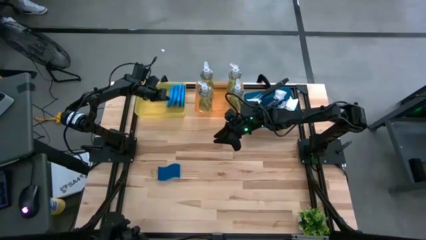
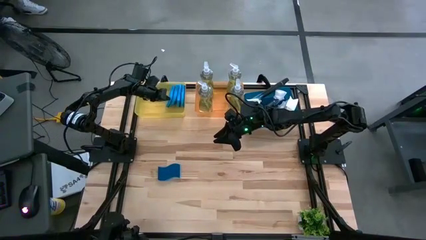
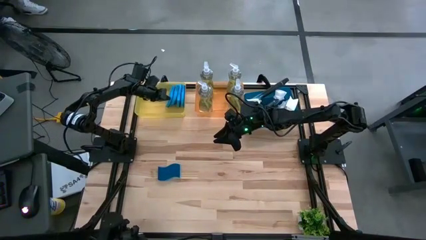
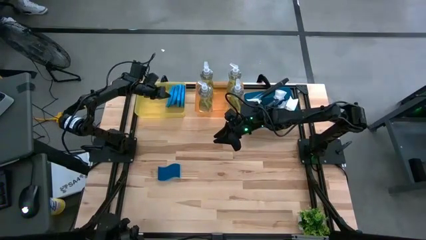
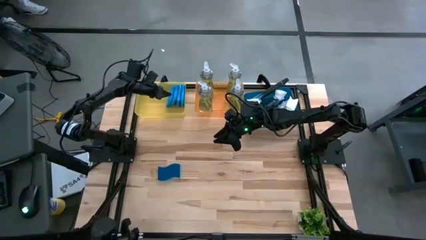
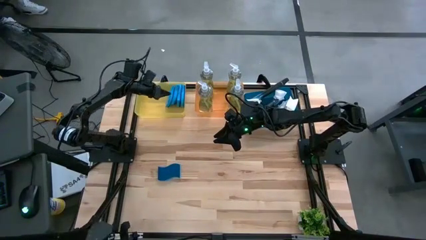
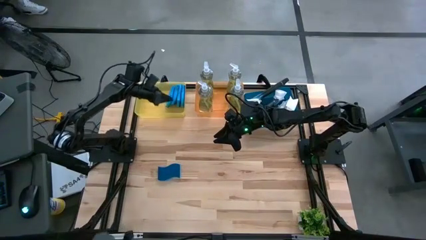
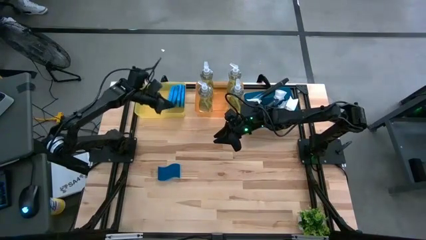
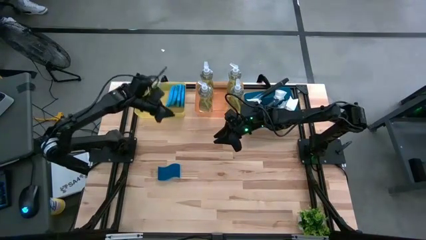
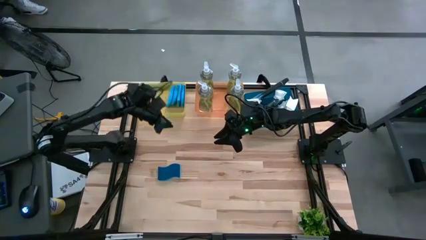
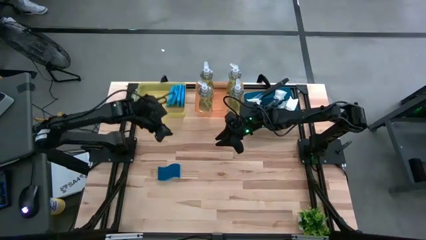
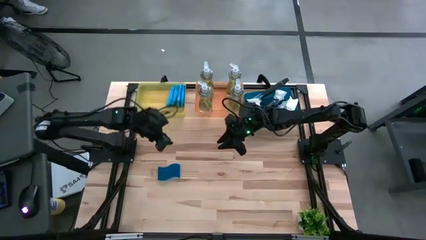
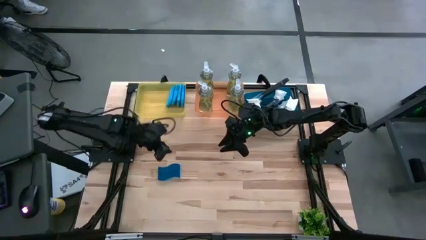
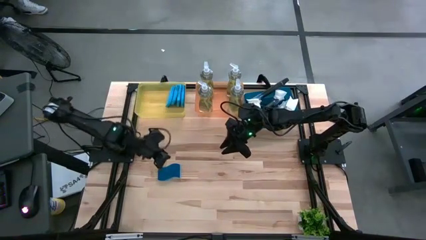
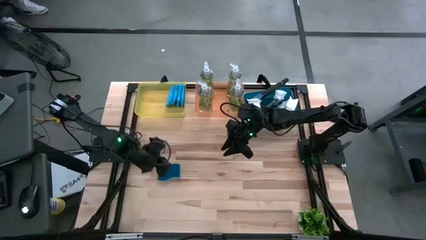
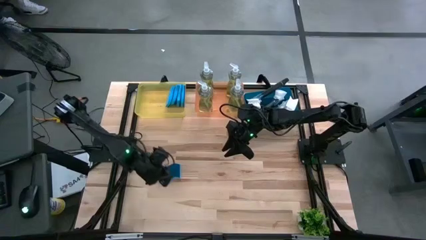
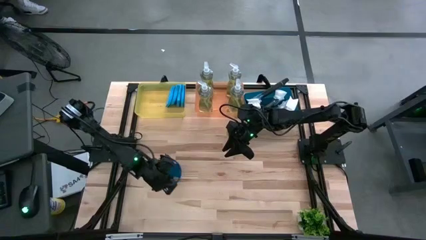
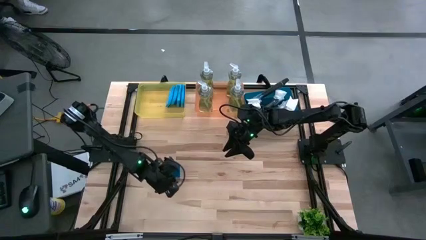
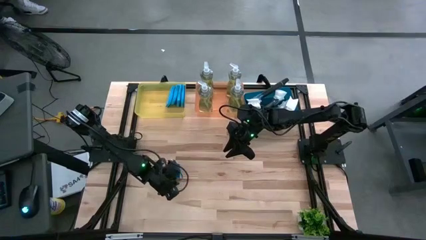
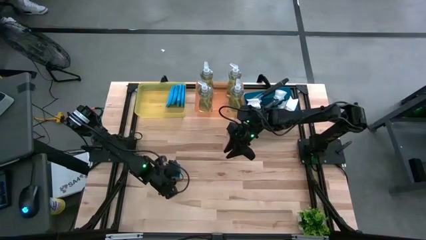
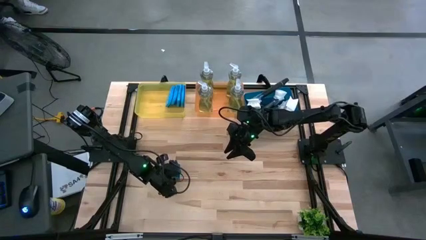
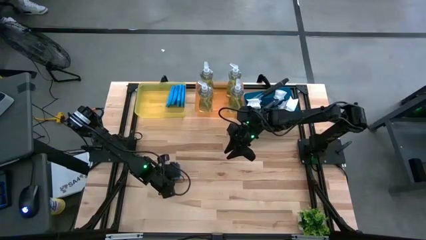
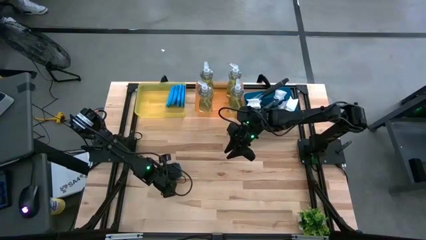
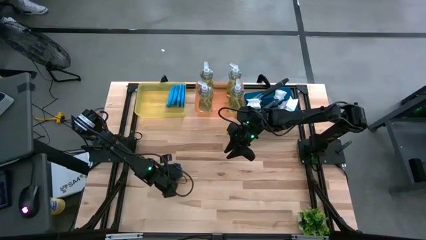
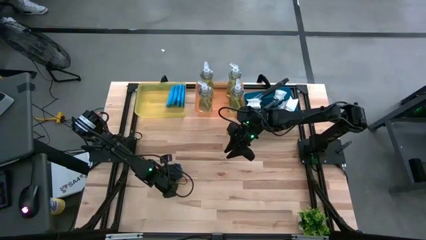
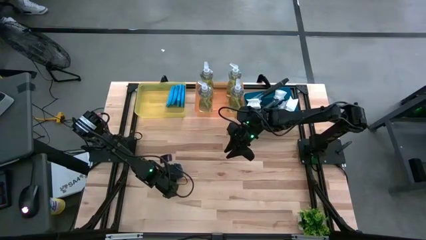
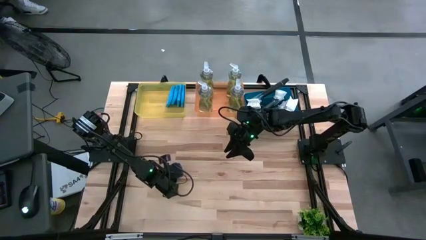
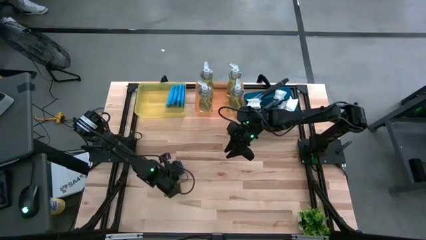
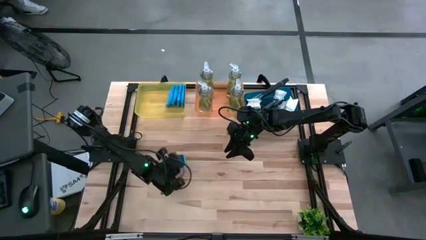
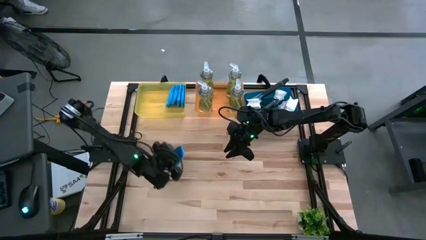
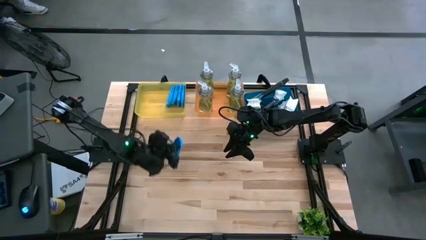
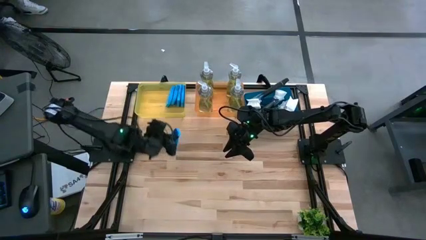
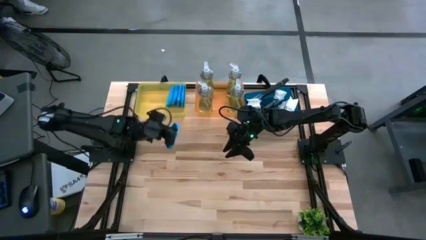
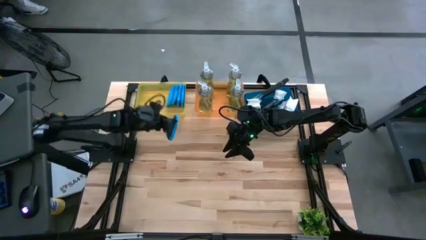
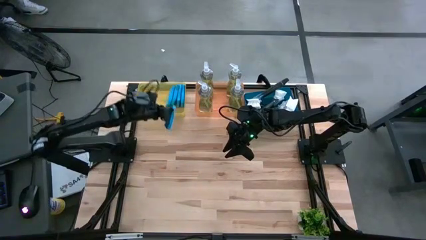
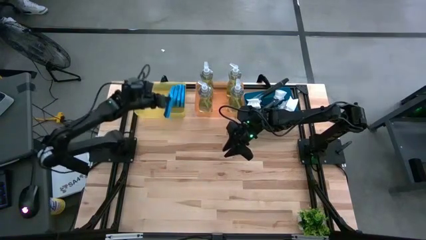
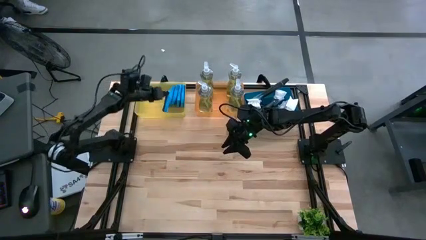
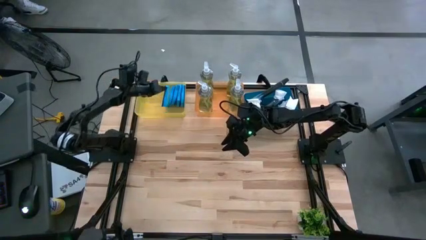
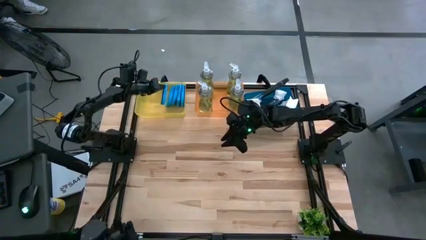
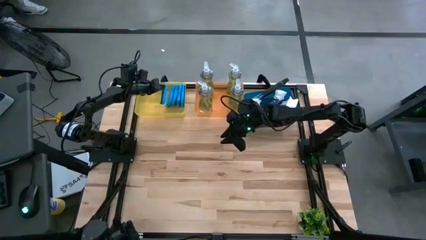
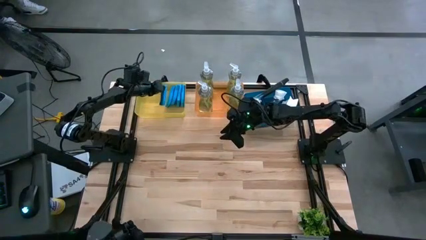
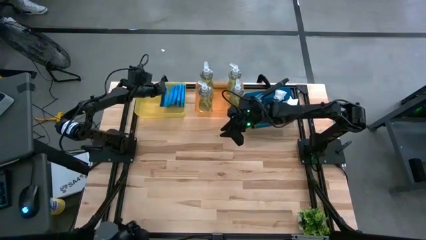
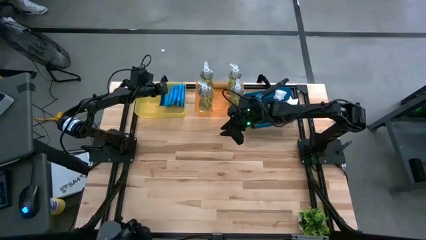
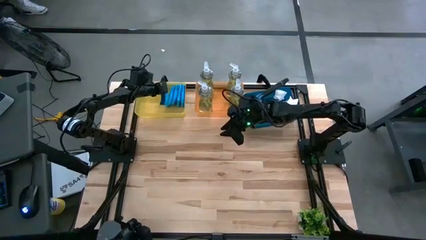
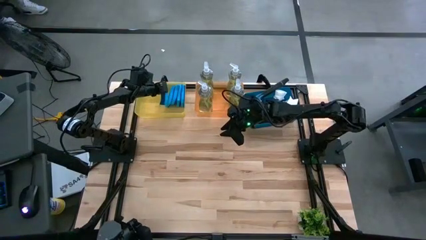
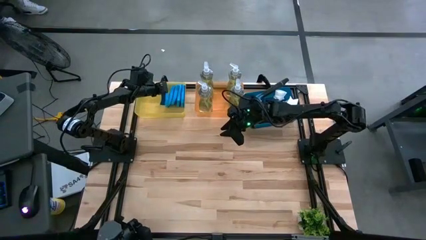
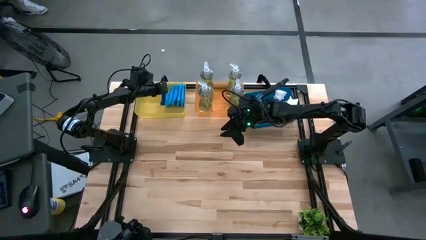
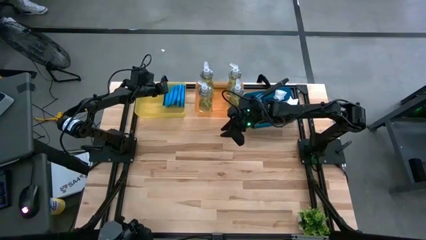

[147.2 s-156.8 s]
Task: Pick & Place Kitchen Sink Supplies
Put the blue sponge into the yellow bin

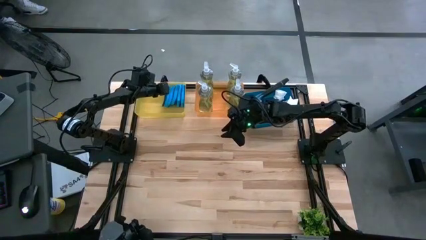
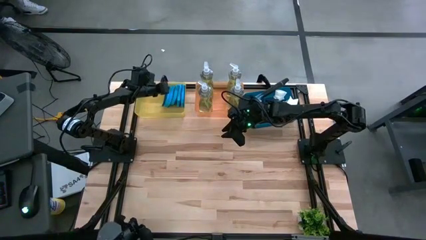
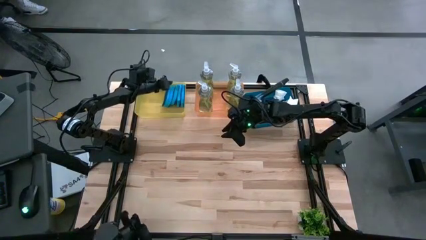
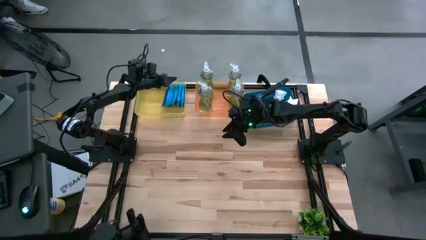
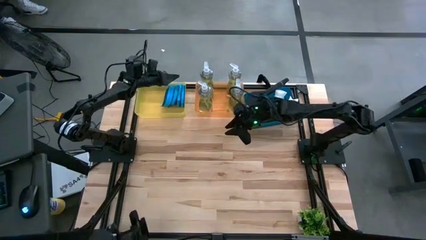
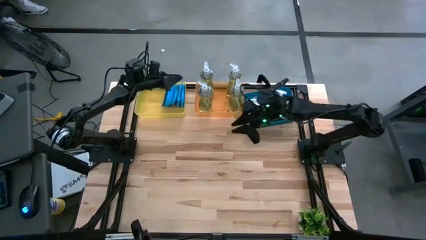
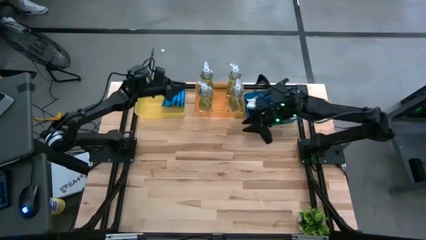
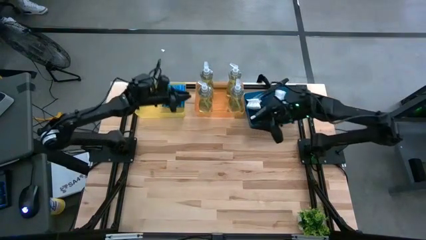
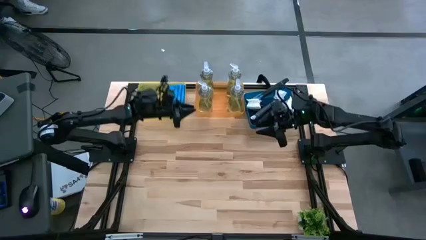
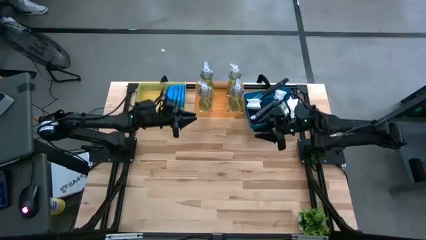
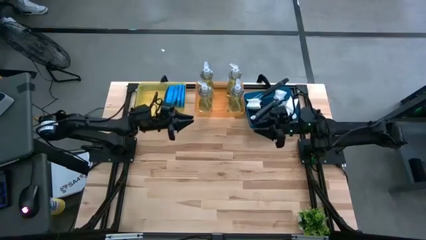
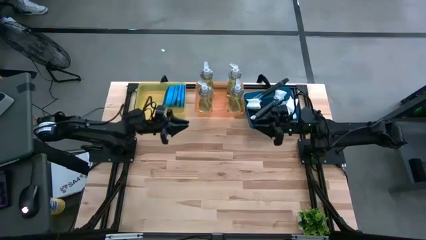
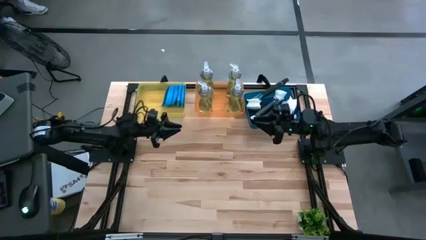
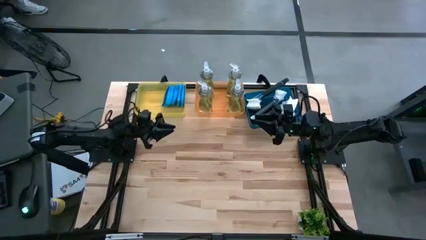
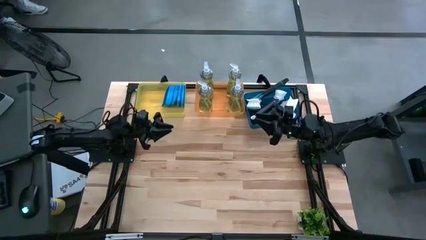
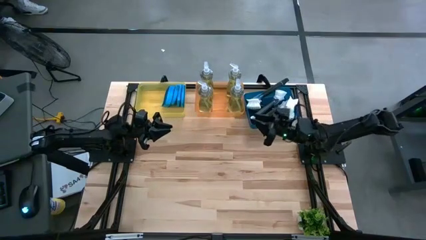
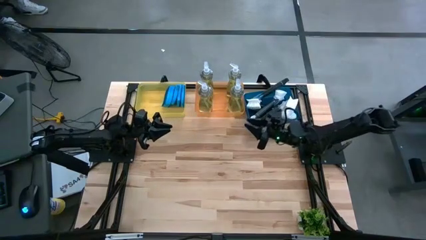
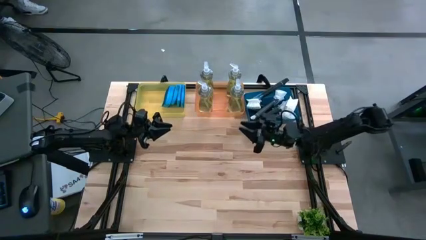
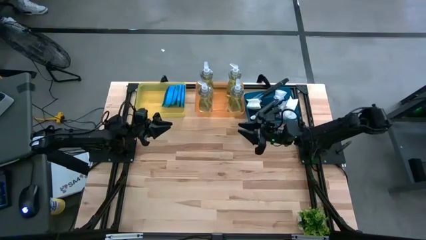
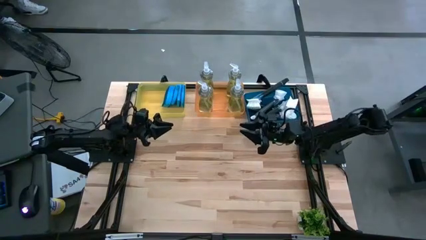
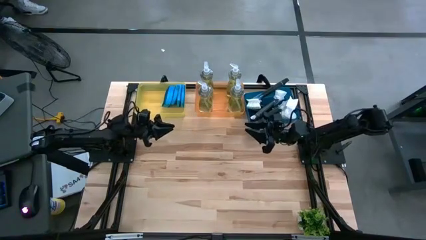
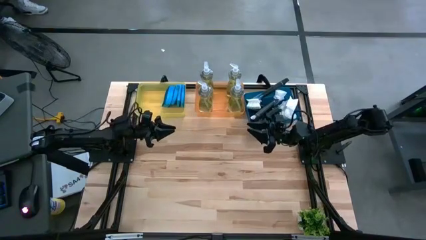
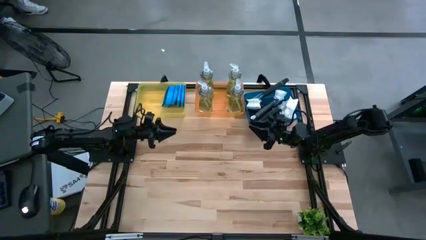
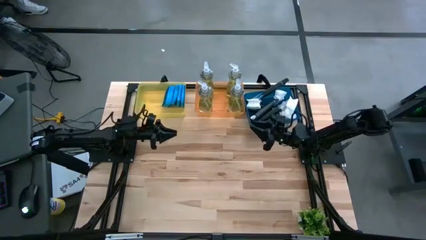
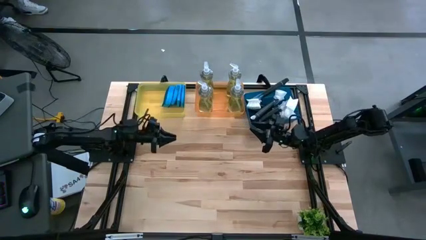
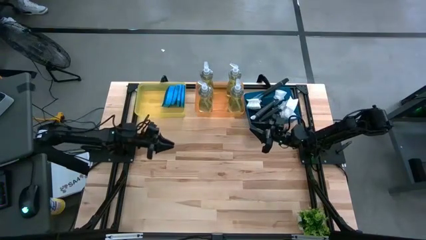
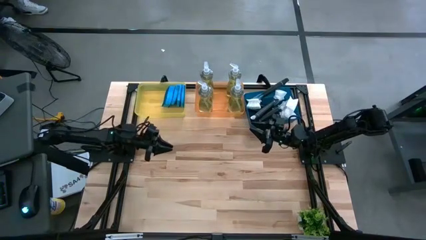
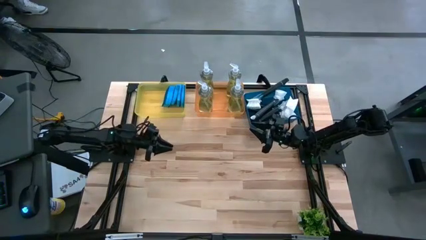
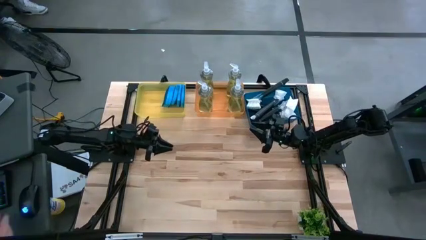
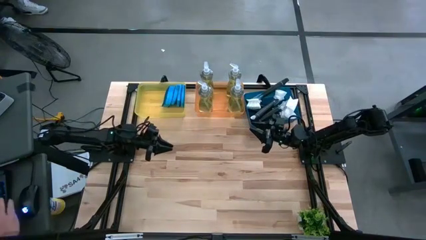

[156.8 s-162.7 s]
Return to Home Position
